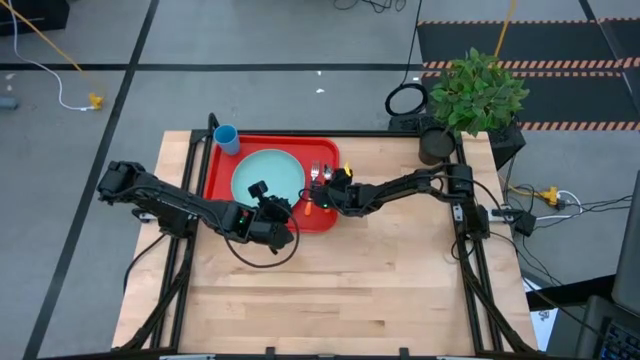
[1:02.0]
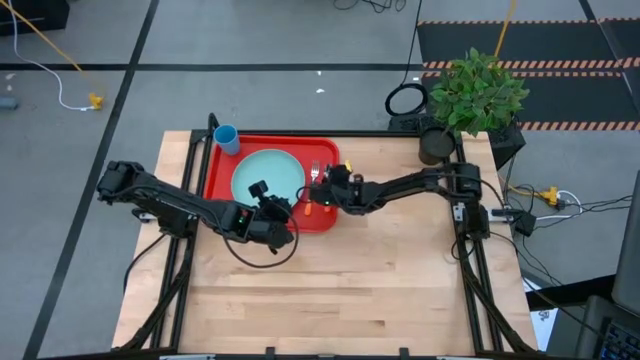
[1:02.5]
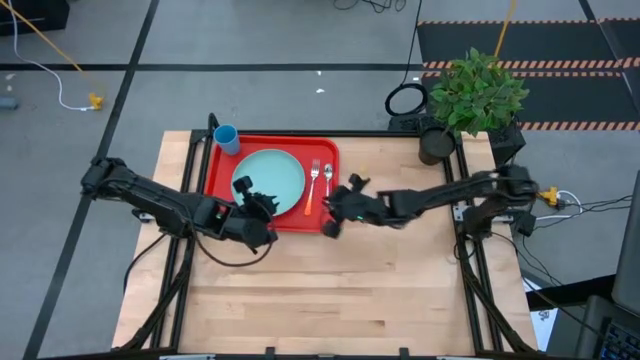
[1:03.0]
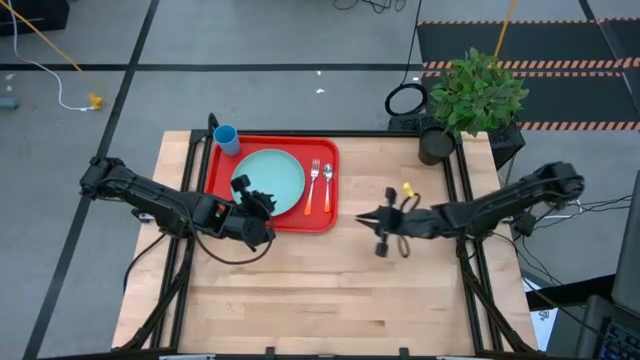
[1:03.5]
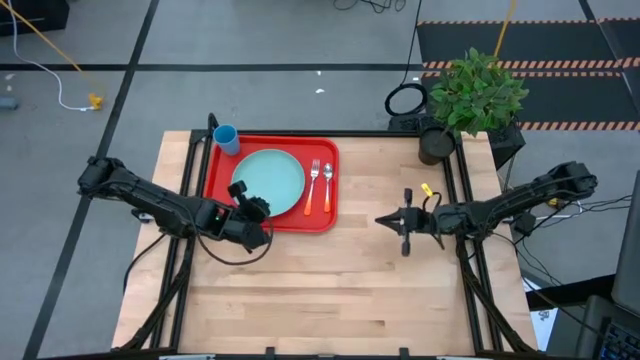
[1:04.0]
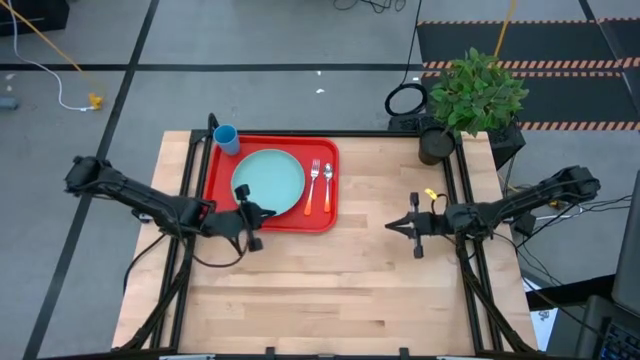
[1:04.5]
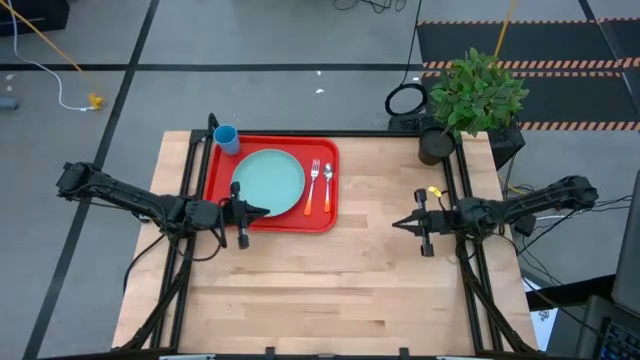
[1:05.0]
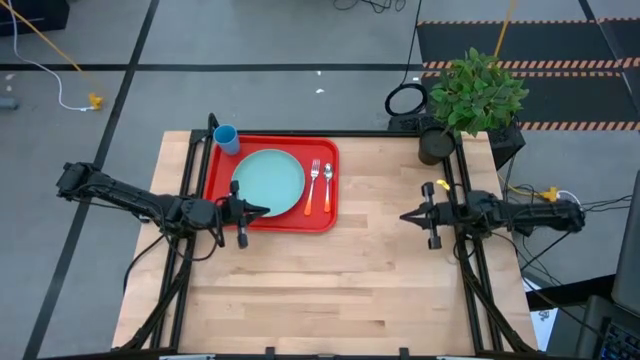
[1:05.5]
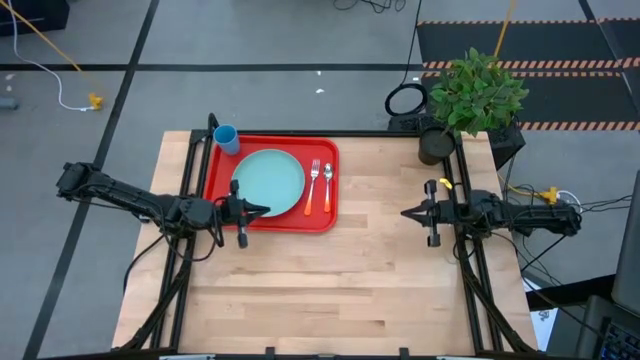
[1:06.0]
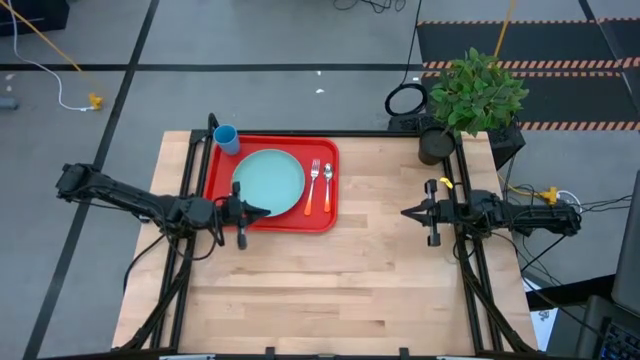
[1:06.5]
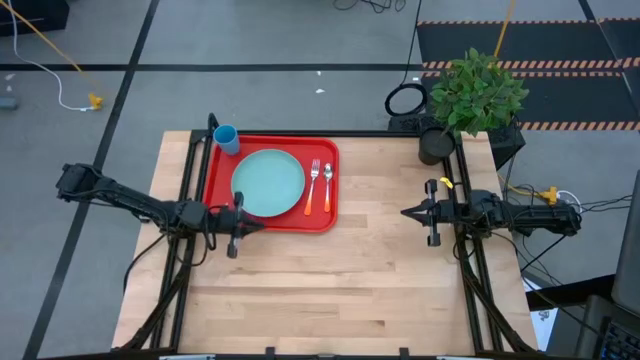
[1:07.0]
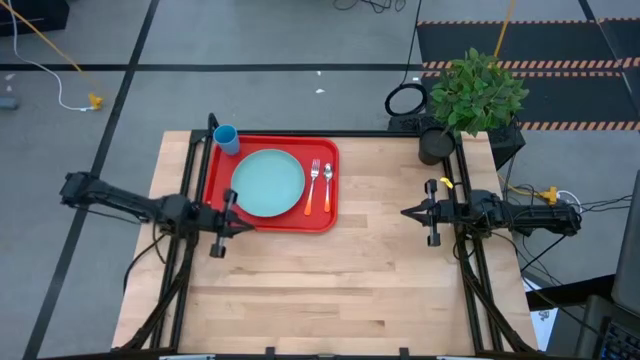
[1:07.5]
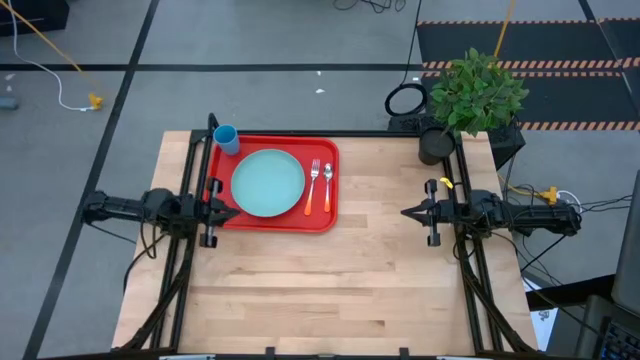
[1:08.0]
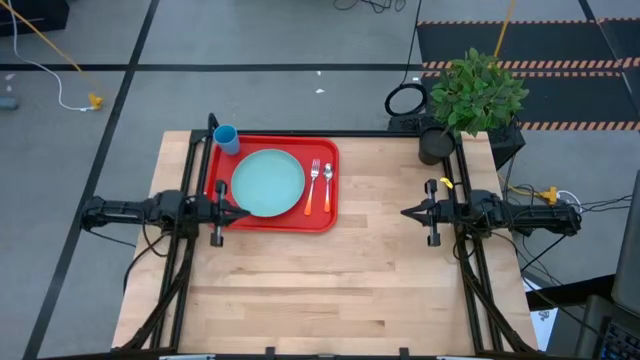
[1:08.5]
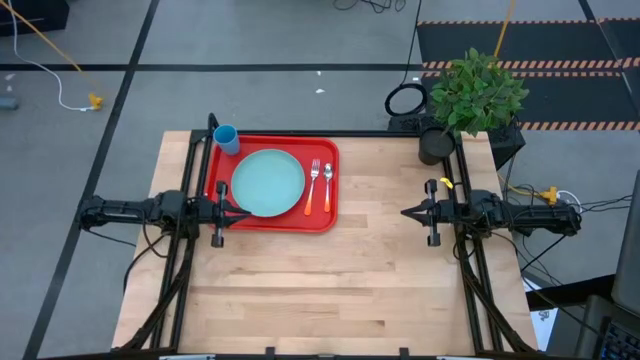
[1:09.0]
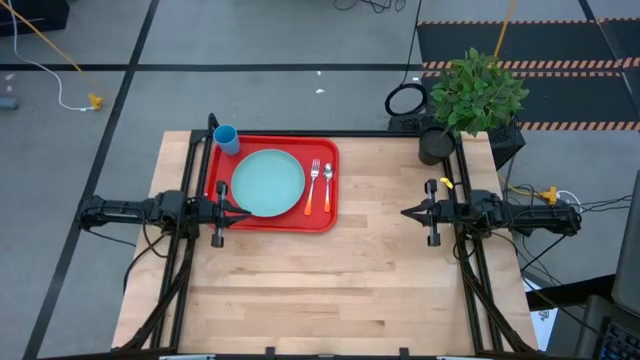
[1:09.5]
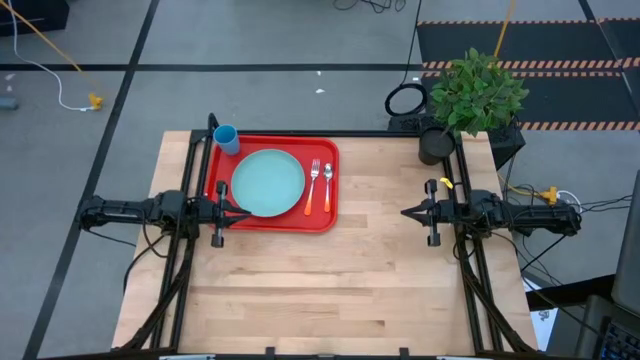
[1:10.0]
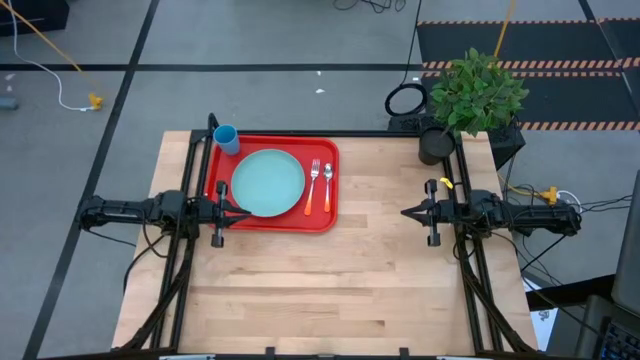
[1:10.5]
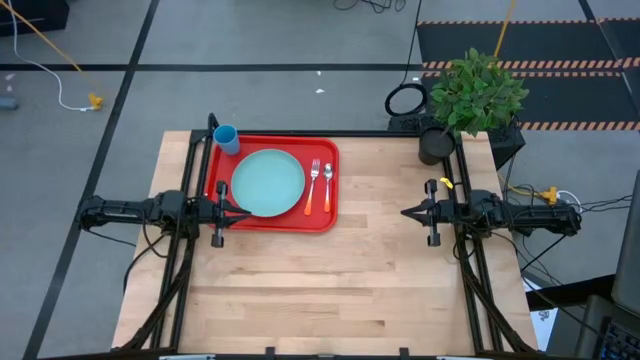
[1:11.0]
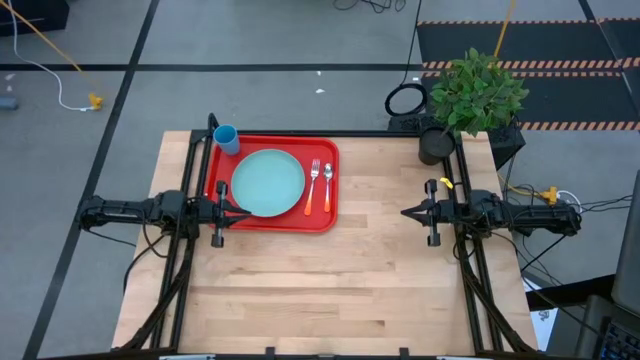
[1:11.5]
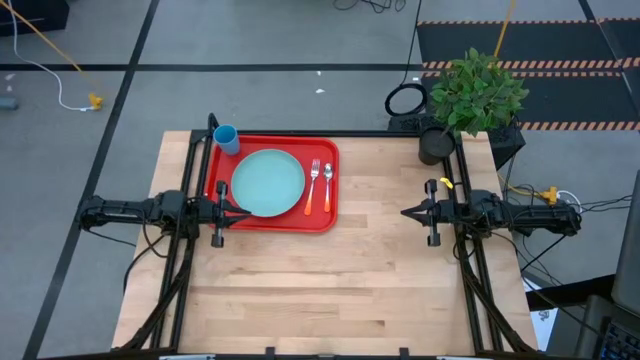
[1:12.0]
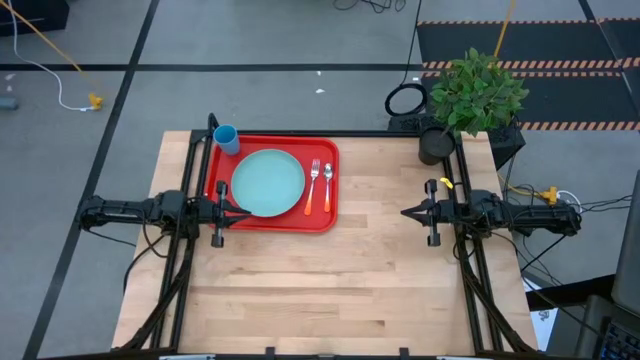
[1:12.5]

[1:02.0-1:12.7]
Task: Pick and place plate/cup/fork/spoon on tray
Return to Home Position

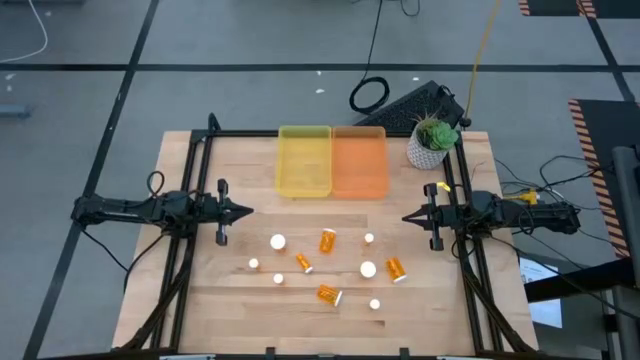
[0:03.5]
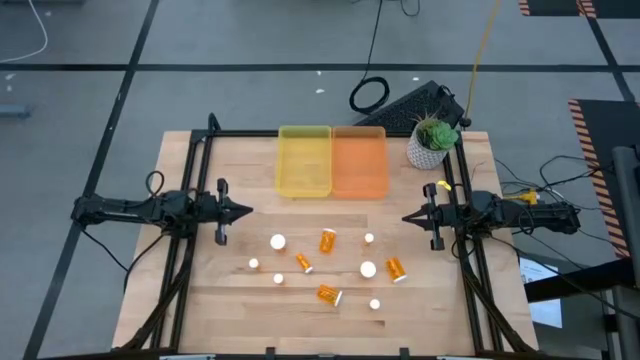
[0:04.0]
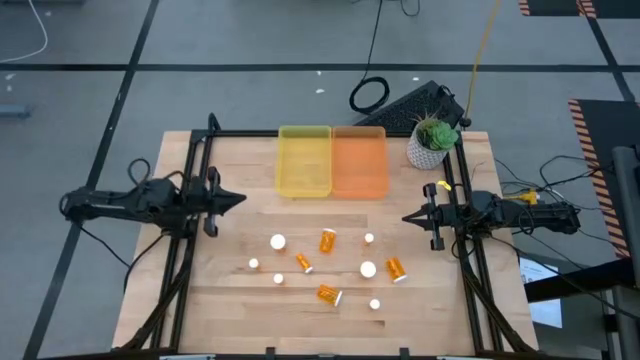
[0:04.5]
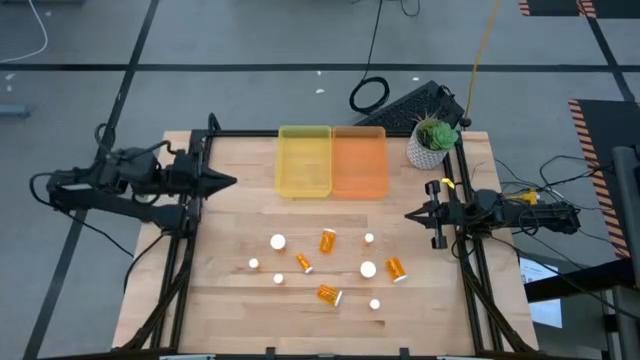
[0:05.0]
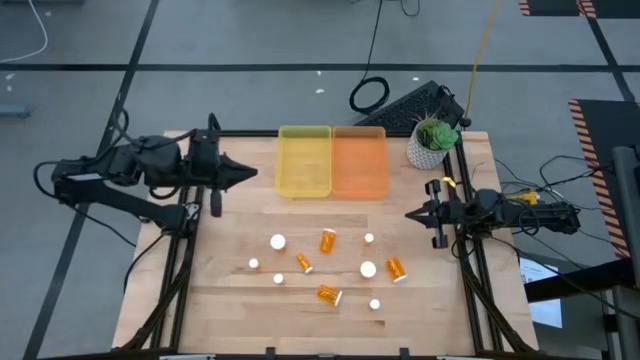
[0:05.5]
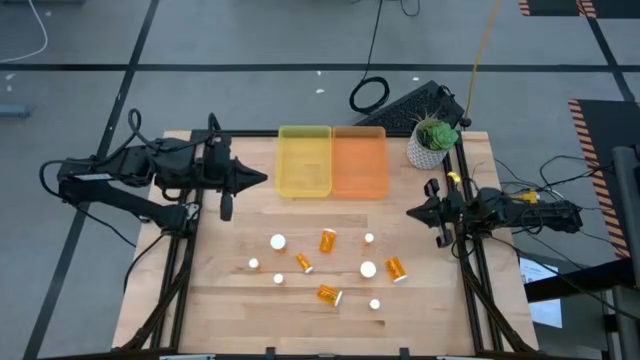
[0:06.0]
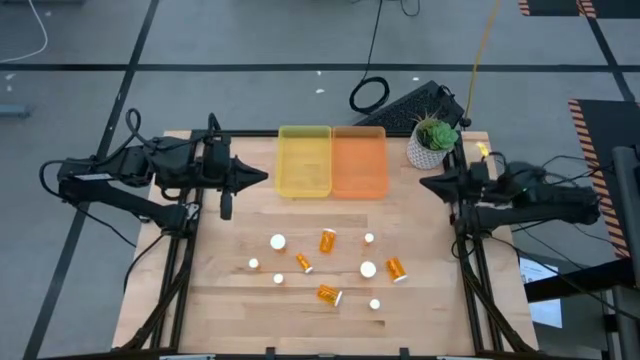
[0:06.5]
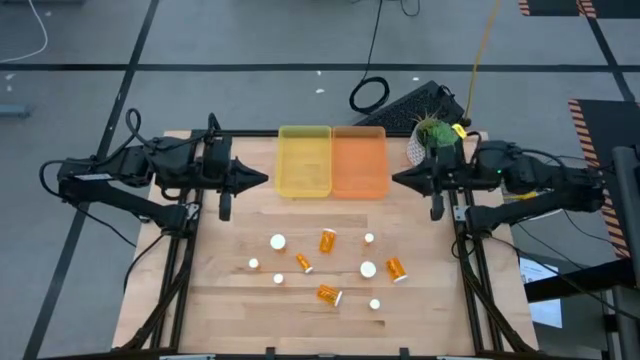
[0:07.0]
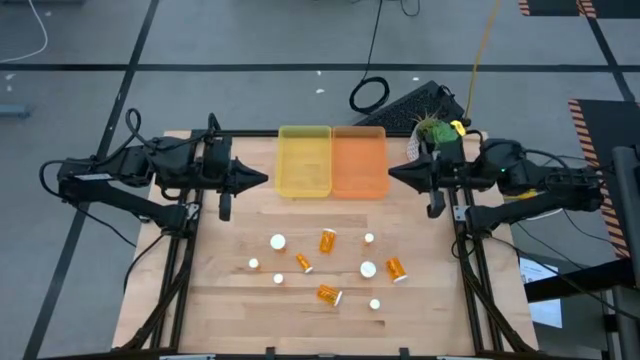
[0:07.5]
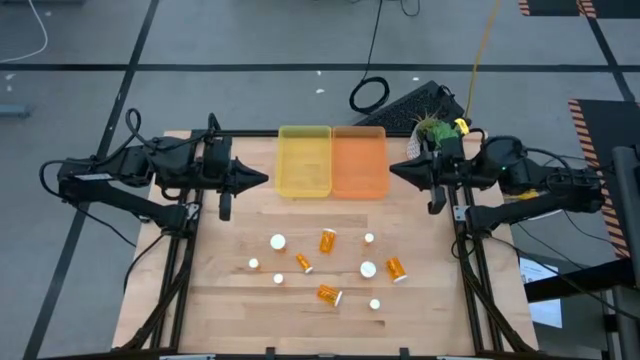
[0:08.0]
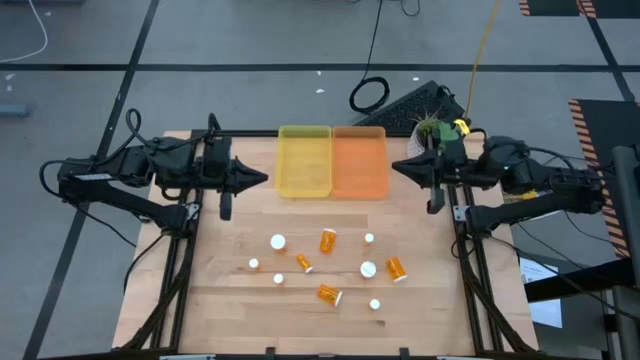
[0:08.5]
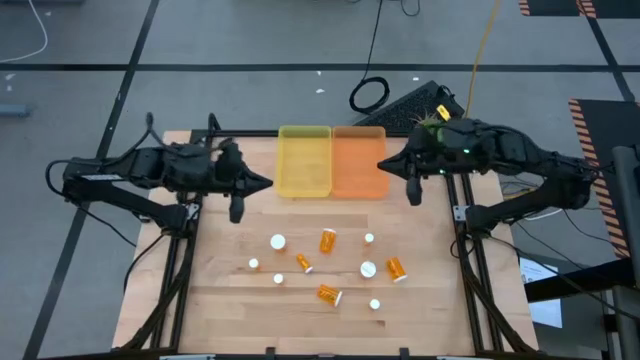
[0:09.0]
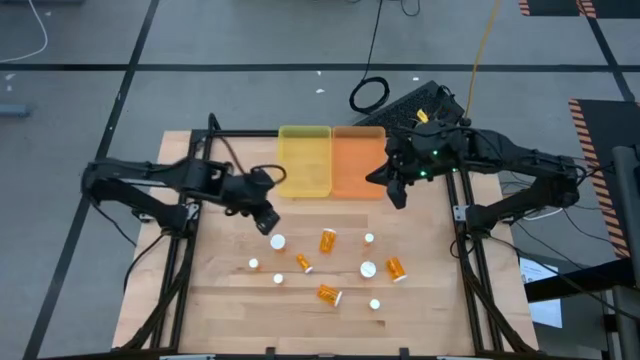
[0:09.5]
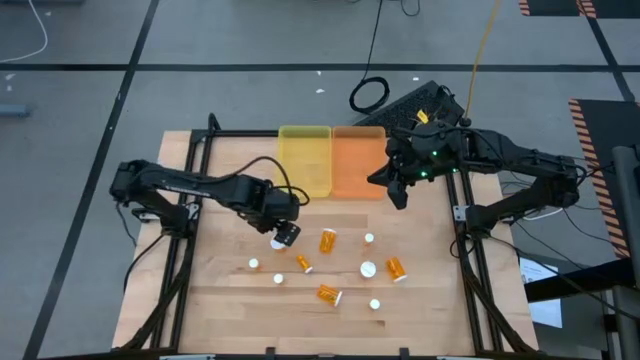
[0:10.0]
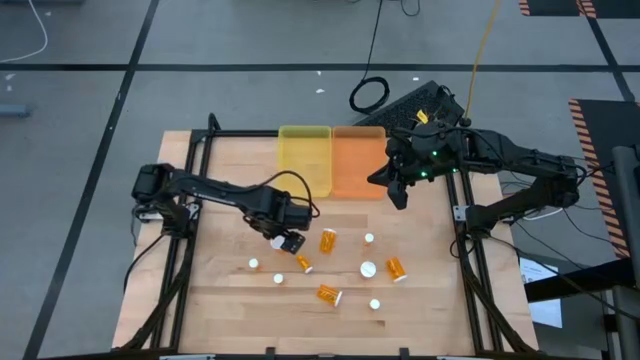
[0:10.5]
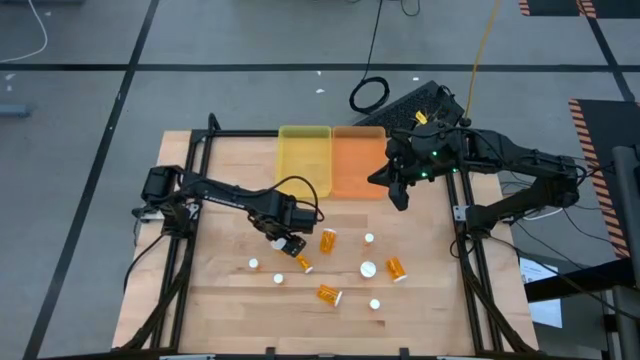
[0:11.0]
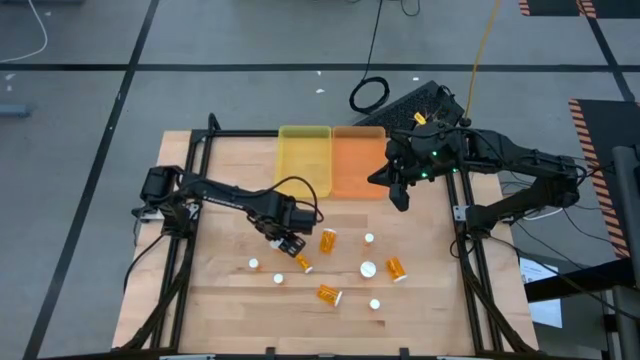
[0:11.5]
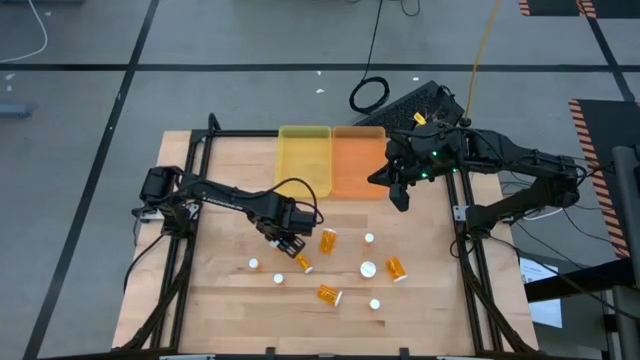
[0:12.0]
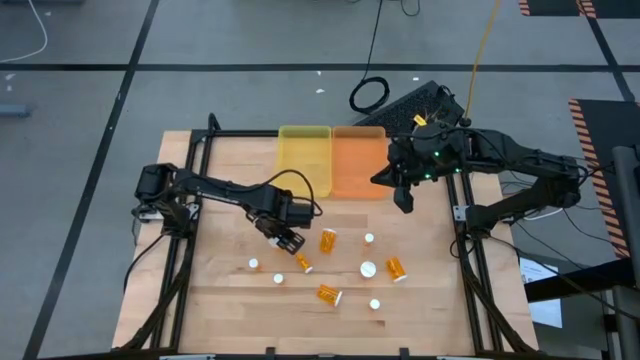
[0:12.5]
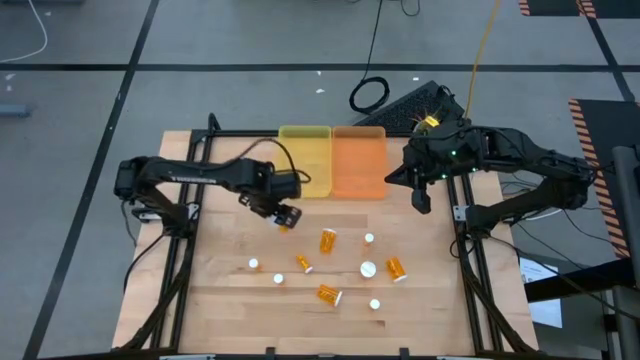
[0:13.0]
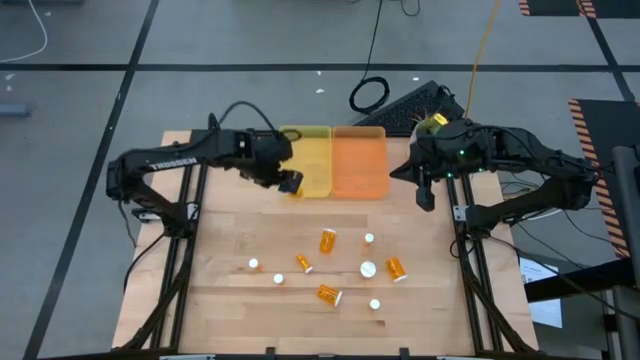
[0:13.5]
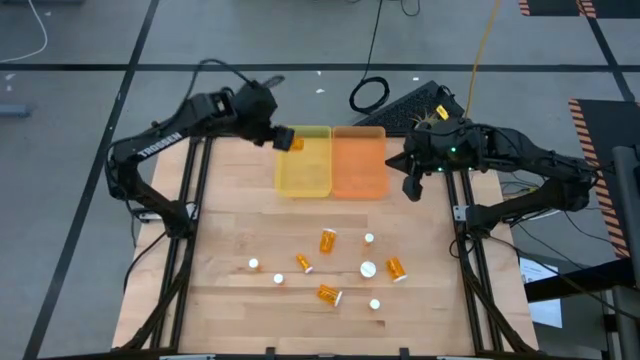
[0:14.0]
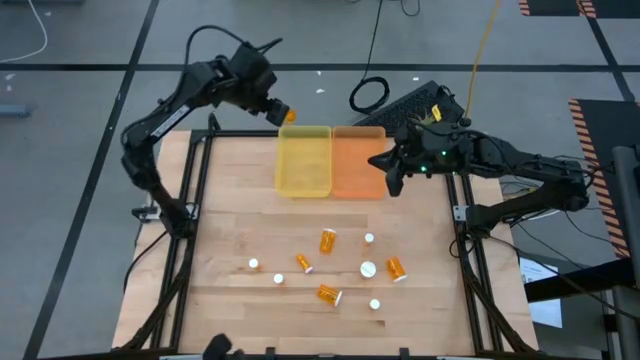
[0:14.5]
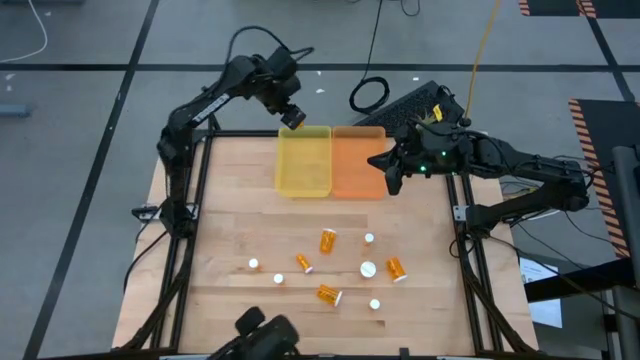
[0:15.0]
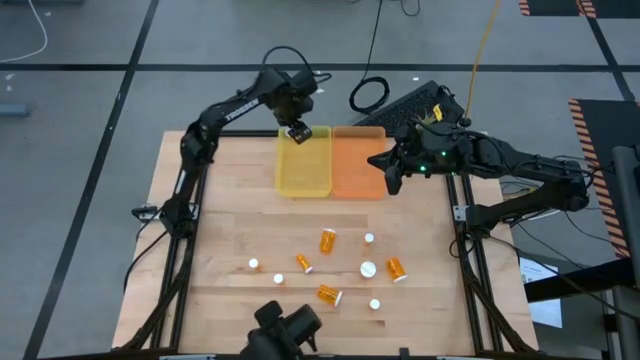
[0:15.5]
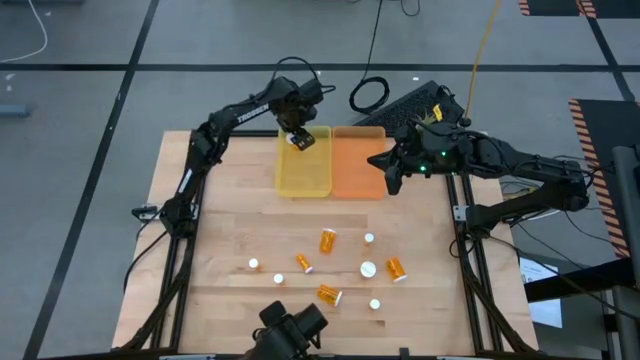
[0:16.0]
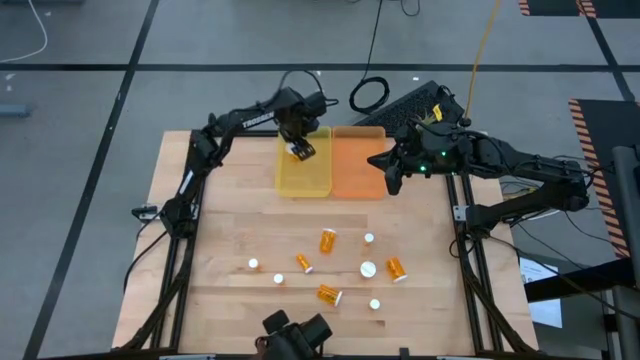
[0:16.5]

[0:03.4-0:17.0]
Task: Pick and place medicine bottles into bin by pill shape (circle, oval)
Put the large orange capsule bottle into the yellow bin
